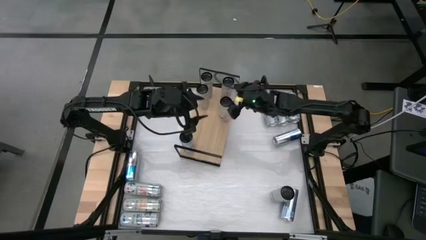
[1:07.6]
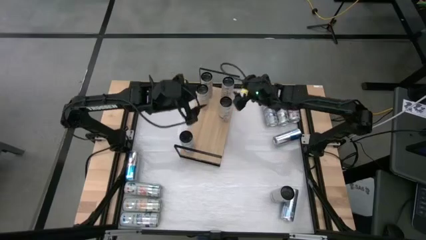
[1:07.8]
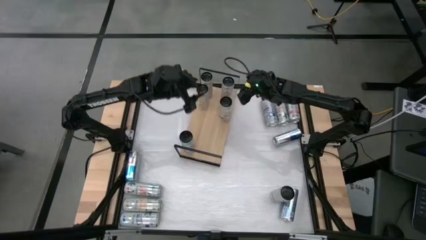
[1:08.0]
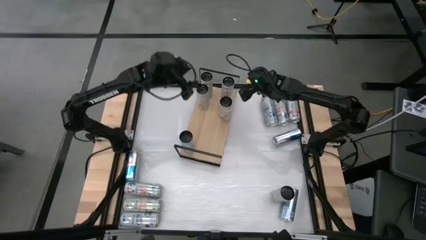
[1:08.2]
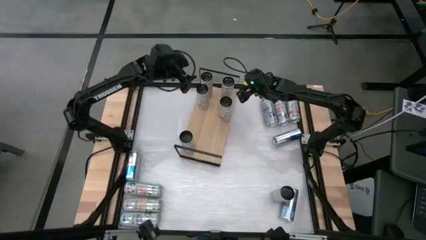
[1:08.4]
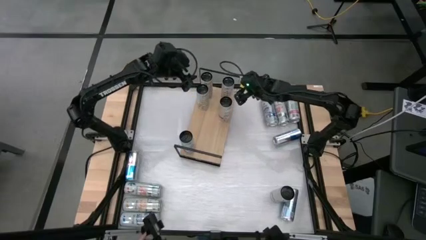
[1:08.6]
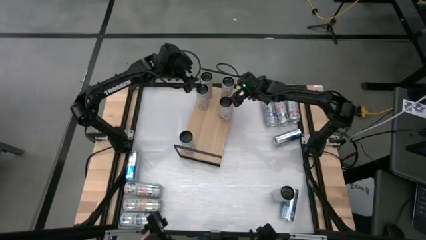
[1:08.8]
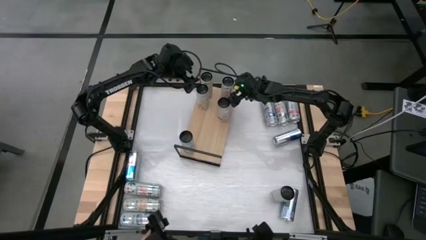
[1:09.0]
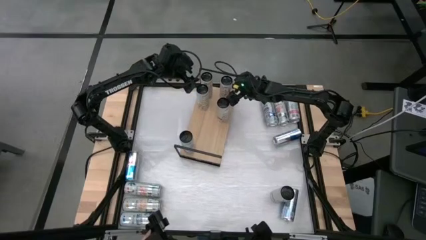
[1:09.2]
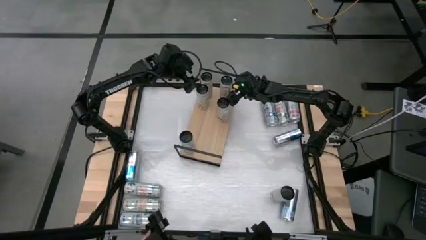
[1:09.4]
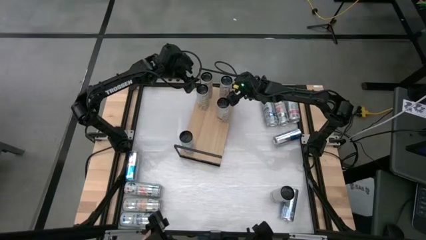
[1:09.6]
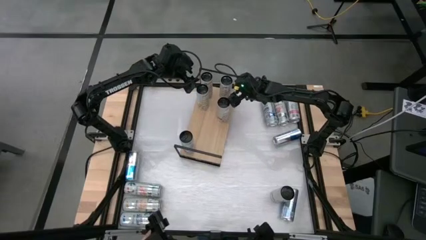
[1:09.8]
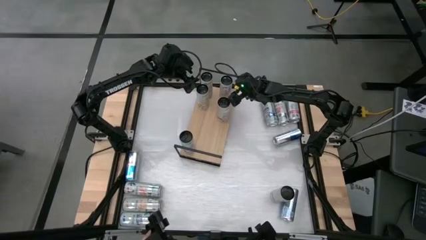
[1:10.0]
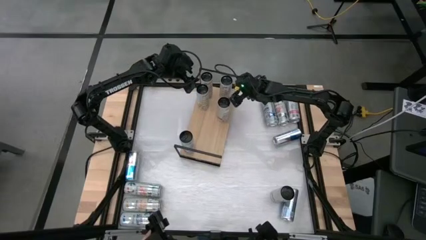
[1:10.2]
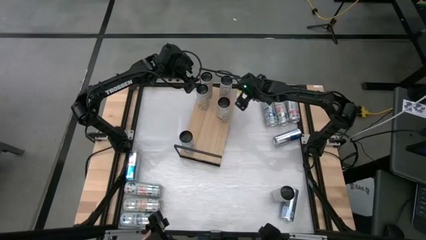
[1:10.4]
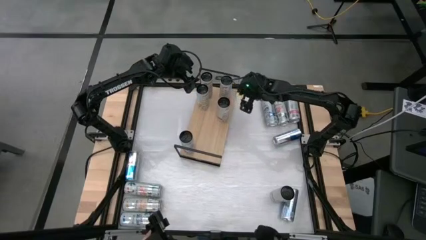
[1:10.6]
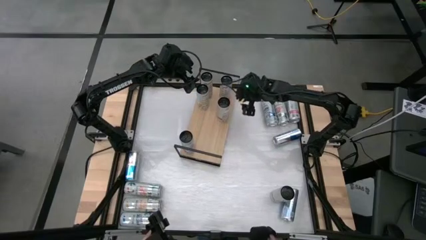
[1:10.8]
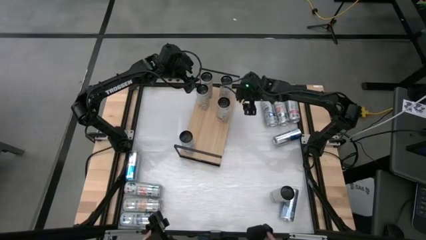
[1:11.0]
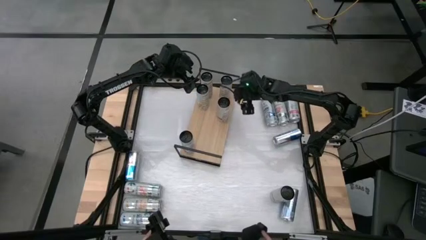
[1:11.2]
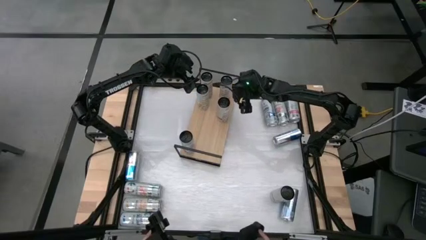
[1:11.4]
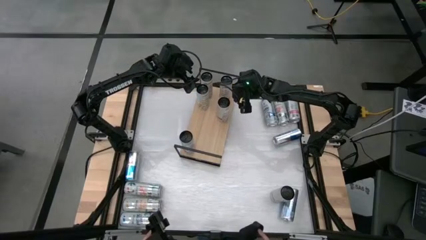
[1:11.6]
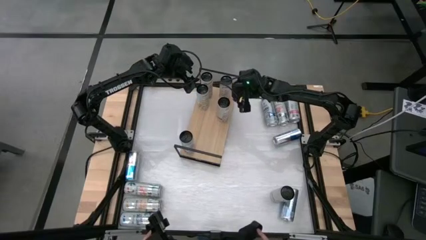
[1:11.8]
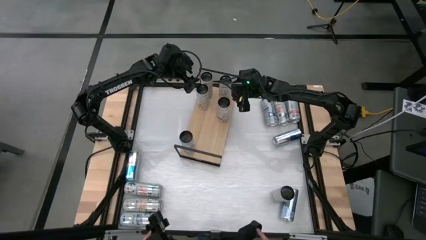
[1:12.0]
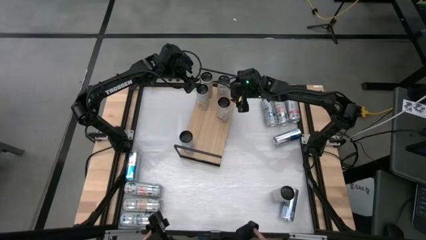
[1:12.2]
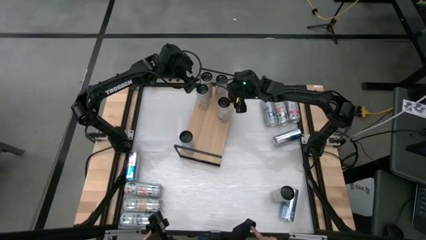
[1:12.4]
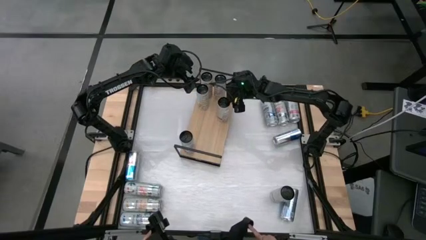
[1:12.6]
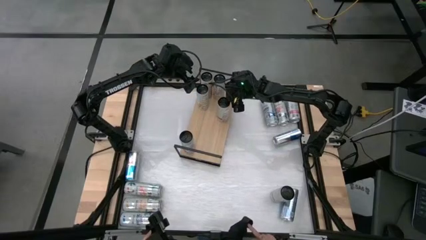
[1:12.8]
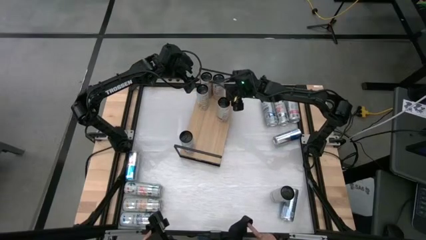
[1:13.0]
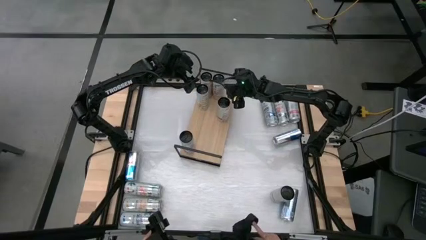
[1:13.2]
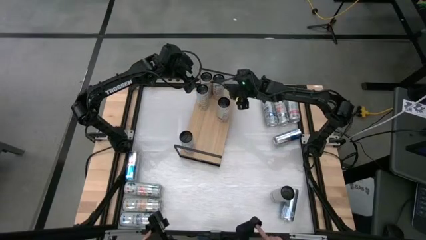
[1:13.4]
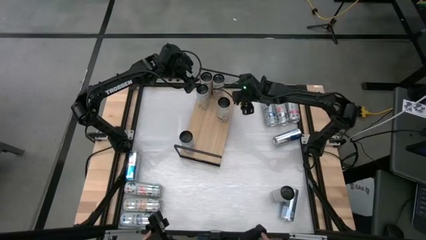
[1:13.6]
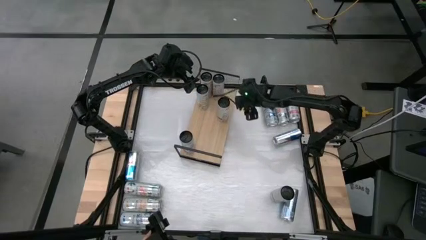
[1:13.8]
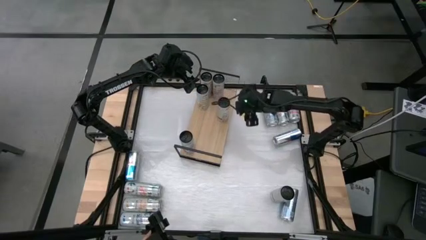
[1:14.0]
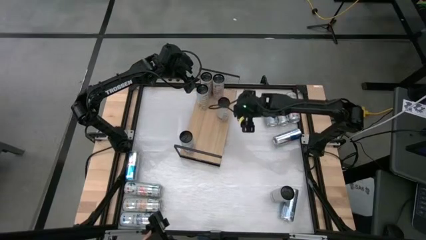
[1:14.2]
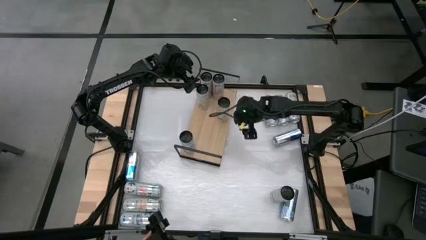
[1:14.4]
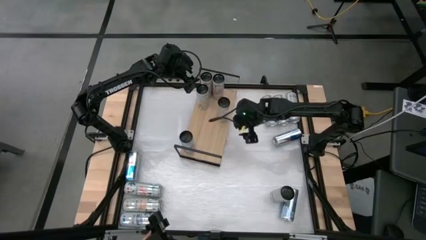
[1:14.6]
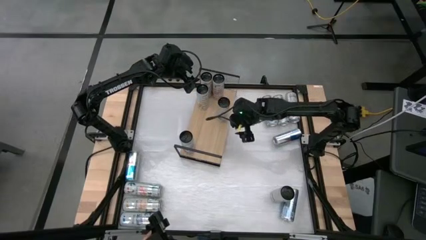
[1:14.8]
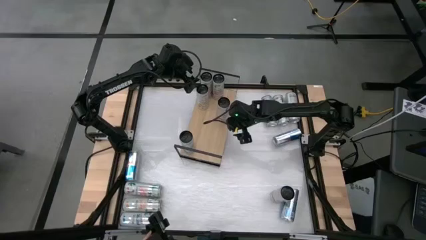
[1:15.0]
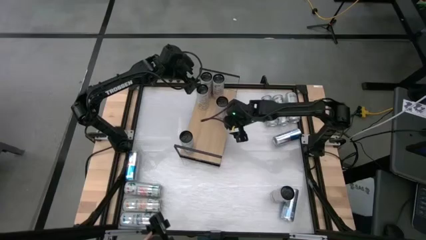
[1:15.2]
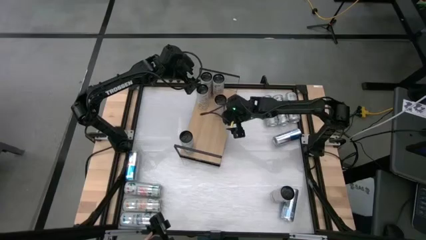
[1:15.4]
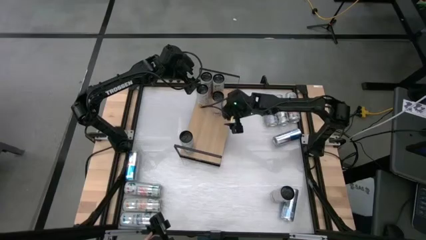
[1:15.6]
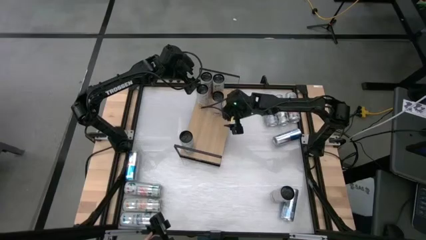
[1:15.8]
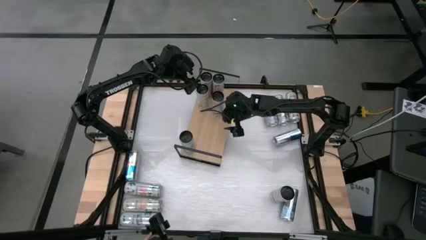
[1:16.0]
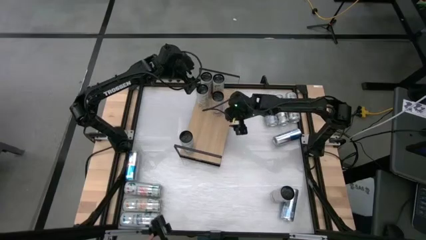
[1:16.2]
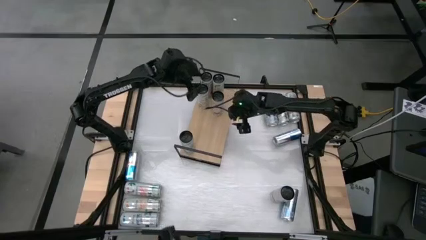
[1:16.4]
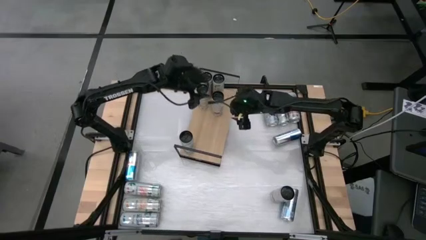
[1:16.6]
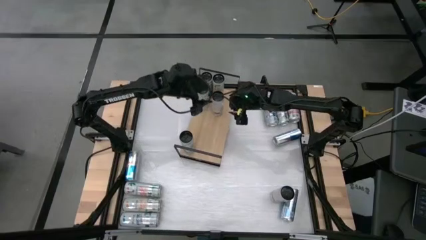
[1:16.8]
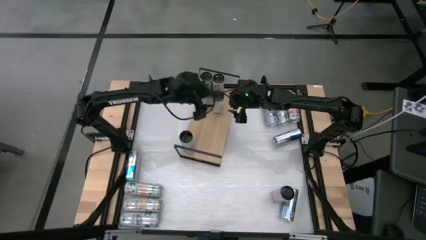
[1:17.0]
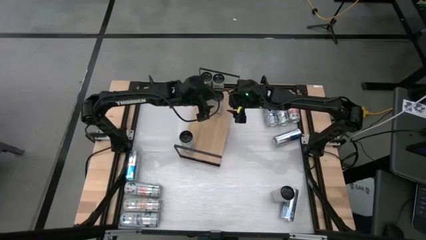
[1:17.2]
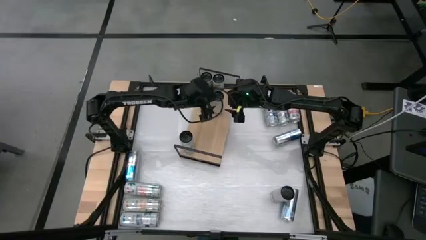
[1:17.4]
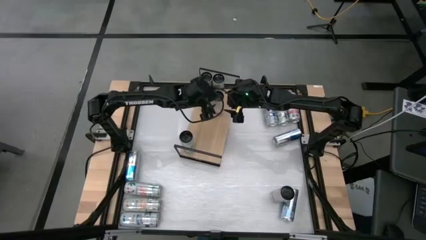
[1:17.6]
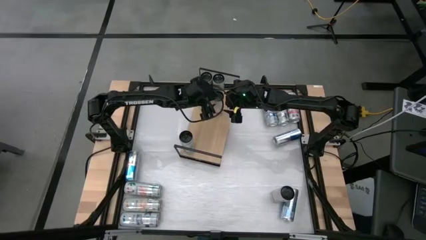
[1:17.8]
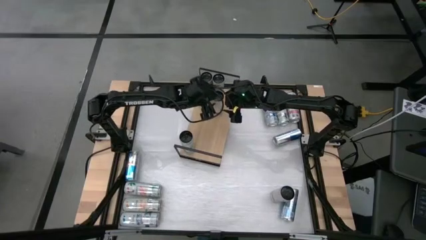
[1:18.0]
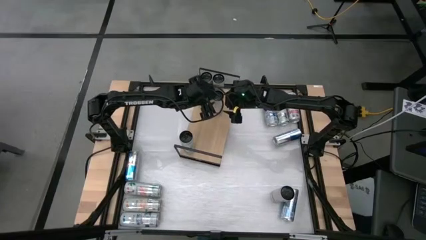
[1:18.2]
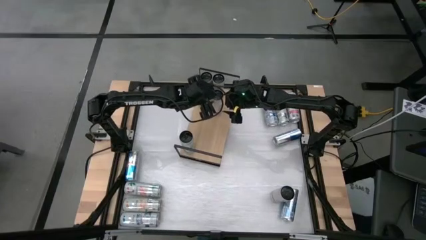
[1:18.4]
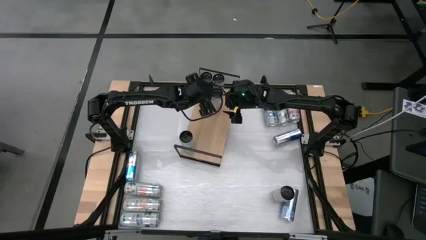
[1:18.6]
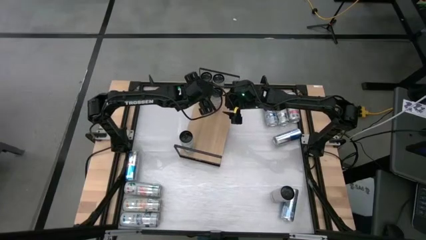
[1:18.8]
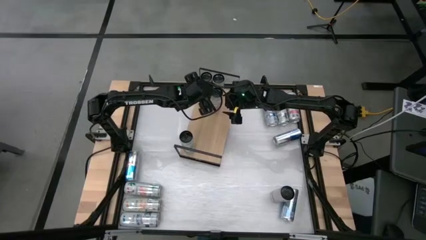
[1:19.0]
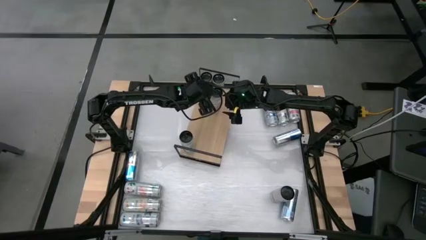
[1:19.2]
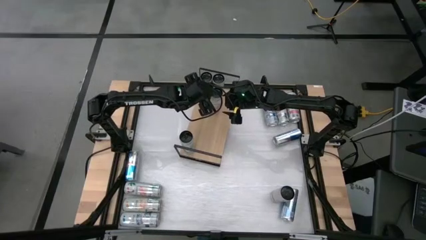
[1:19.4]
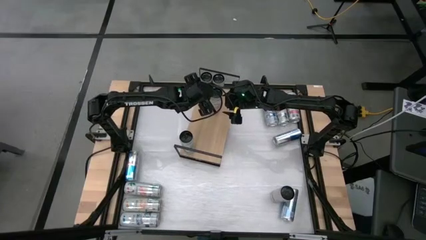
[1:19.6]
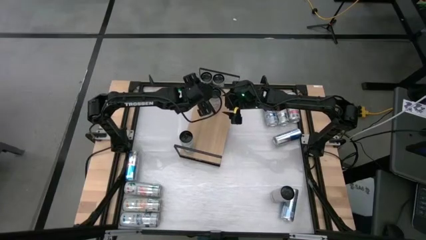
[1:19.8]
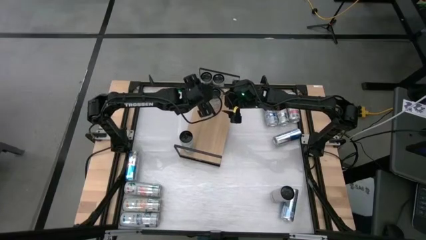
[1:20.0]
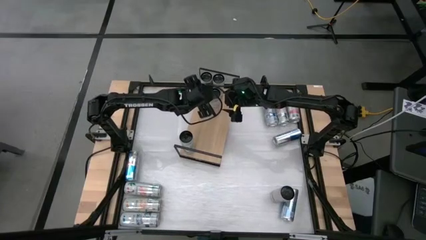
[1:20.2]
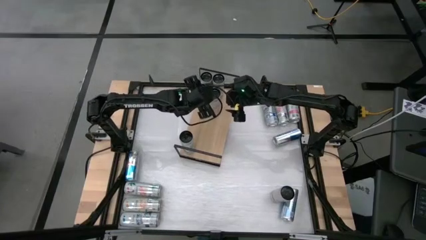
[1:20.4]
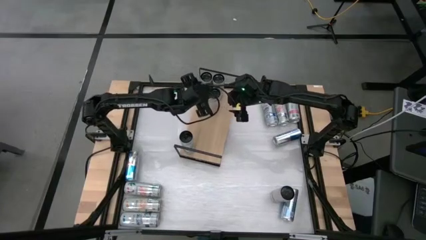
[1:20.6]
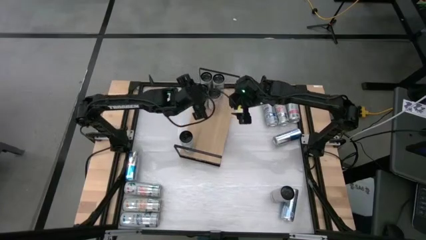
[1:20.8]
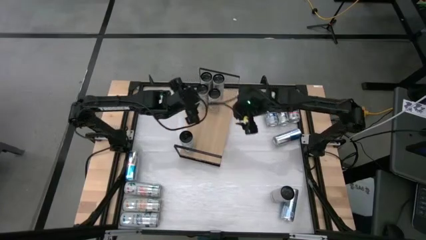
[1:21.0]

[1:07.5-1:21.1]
Task: Place canned beverage on shelf
Adjust the pink soda cans

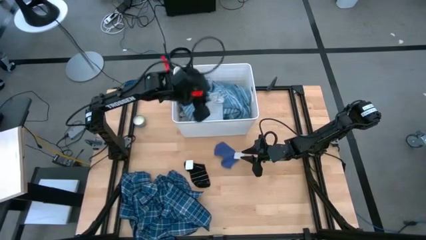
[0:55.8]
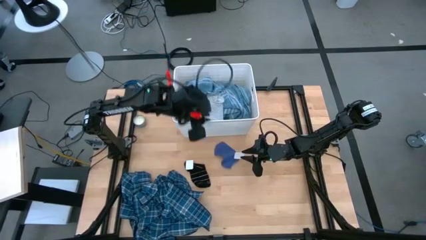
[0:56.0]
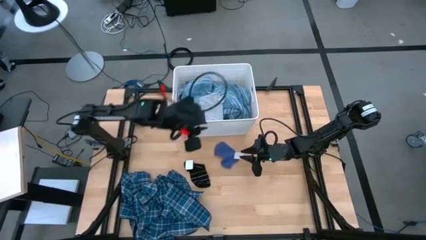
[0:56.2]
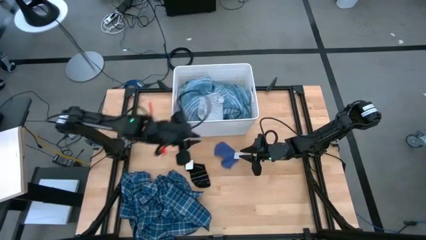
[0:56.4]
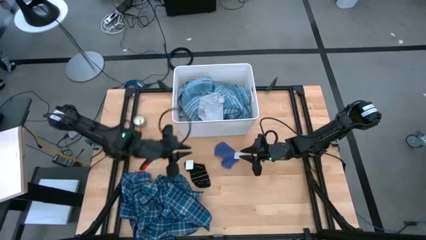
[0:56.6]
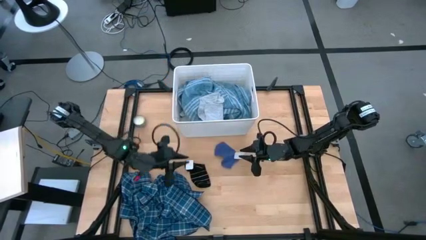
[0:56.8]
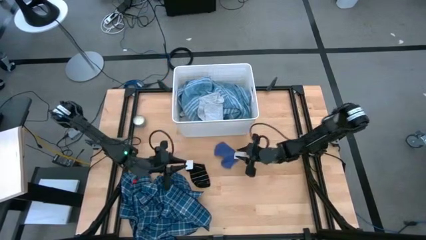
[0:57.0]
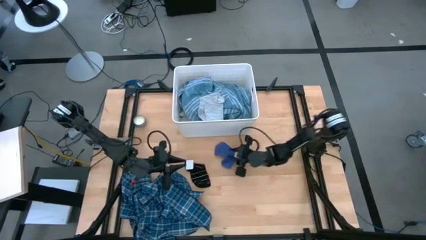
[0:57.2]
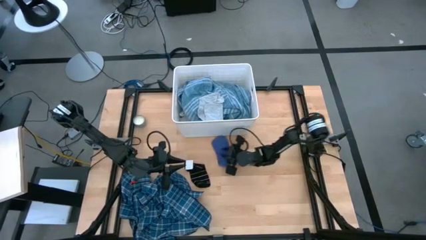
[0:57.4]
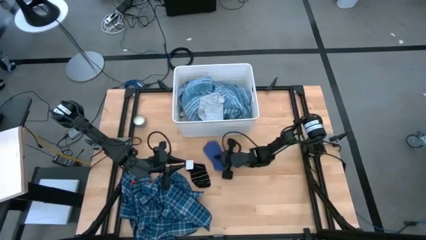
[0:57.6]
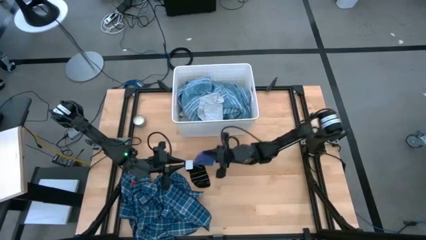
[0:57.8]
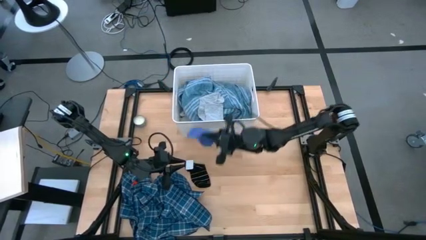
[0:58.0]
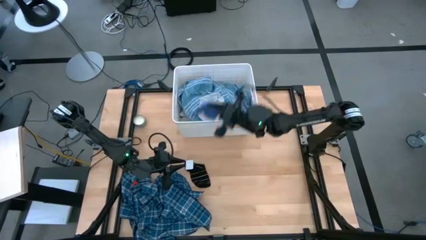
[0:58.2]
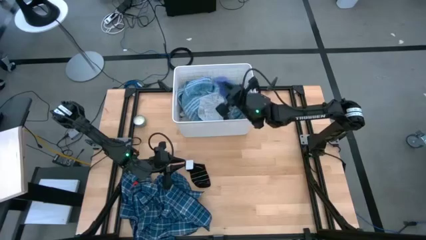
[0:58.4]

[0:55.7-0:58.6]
Task: Sort clothes
Put the blue sock into the white bin

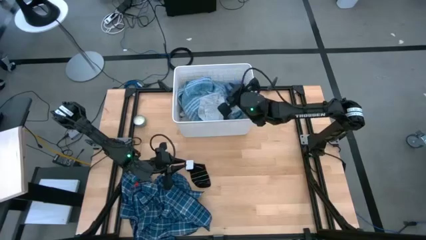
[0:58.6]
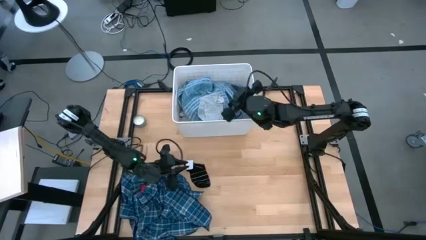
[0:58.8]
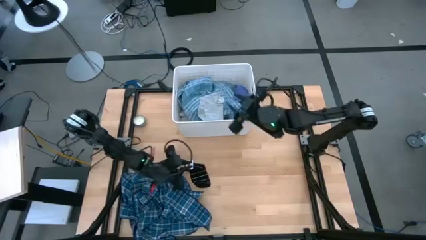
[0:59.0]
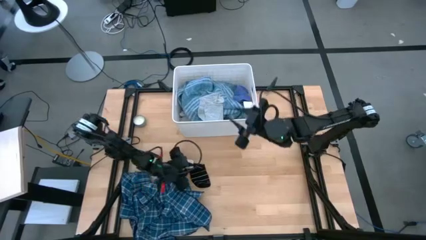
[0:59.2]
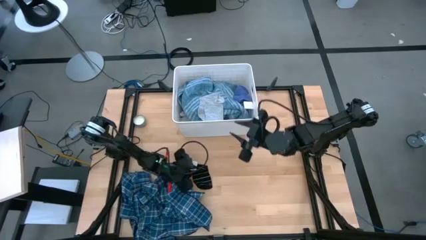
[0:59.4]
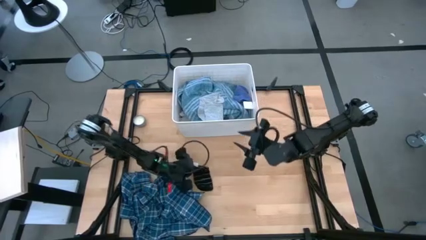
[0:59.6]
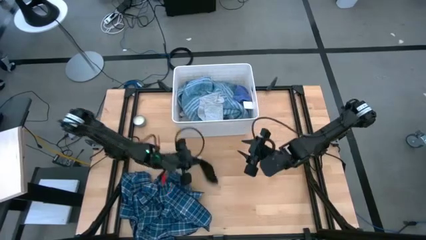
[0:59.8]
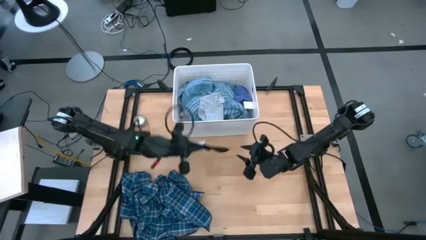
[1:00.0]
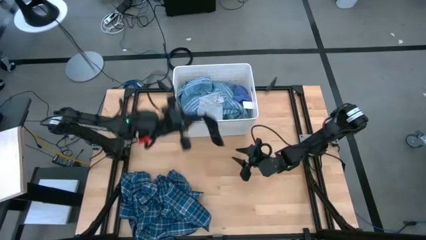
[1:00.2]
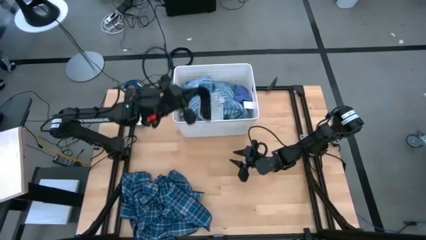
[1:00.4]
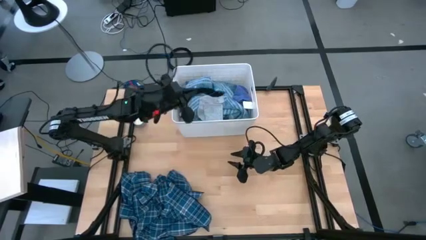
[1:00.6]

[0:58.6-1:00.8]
Put the black sock into the white bin
